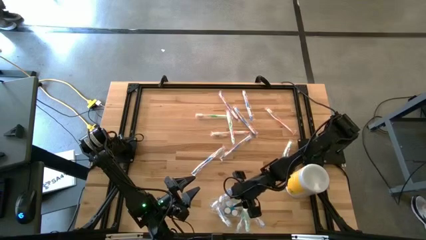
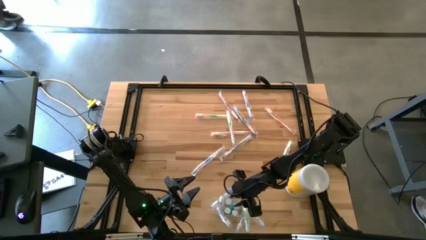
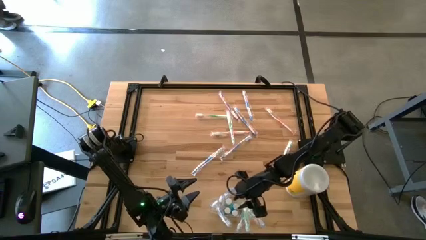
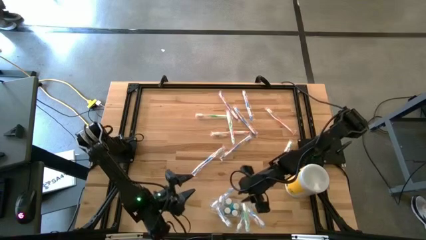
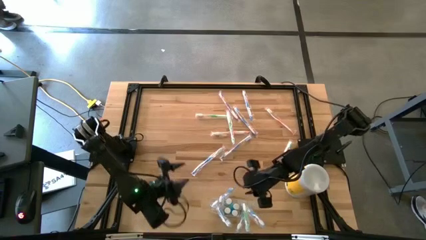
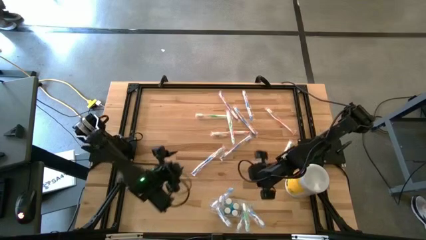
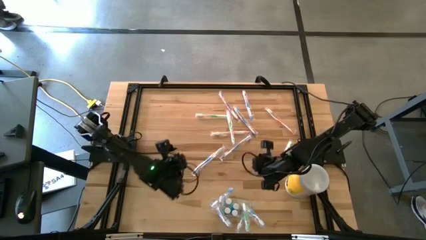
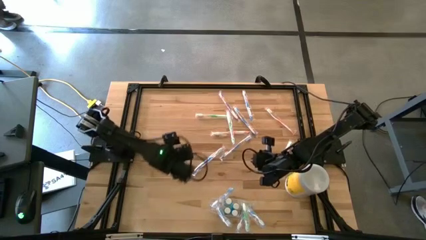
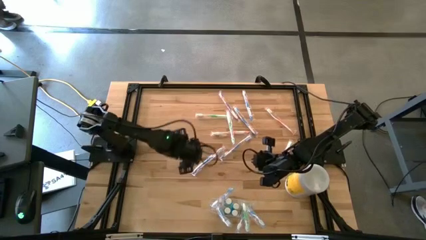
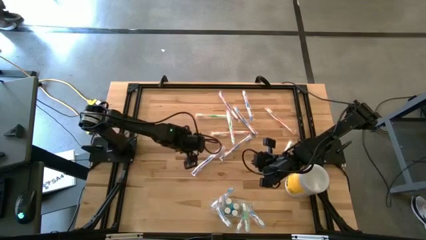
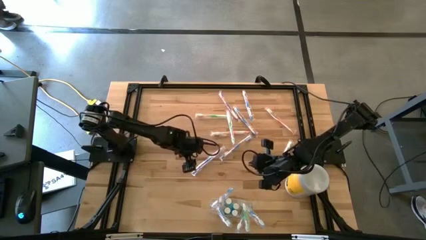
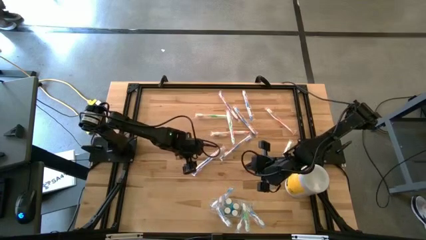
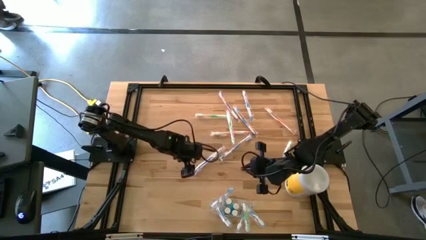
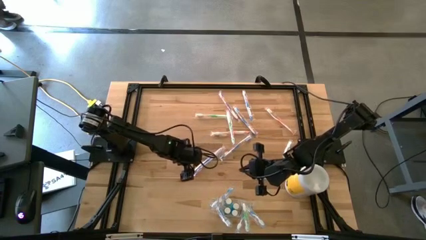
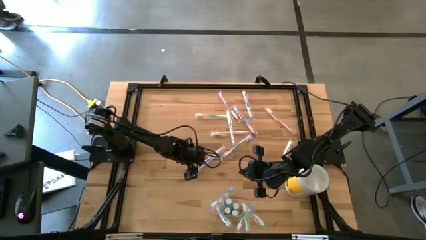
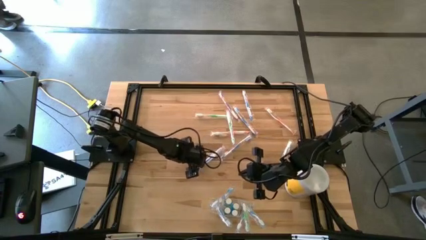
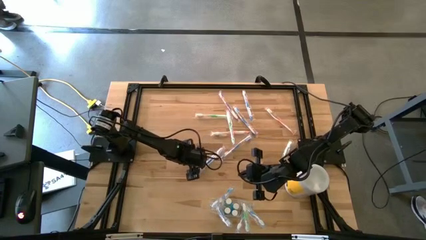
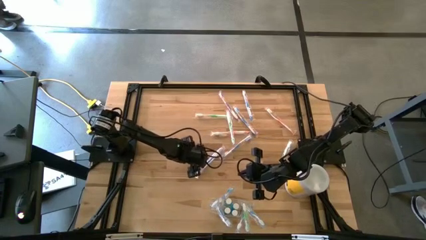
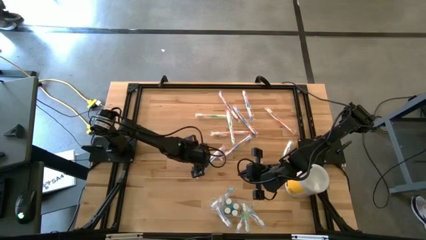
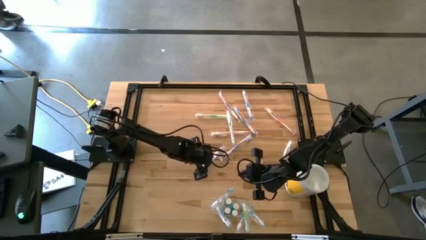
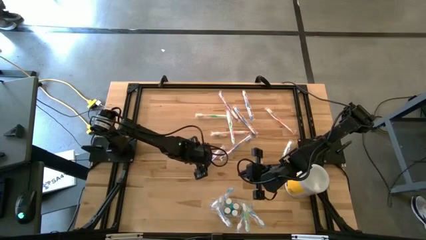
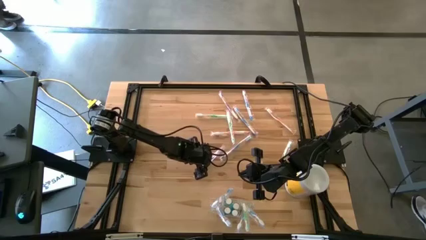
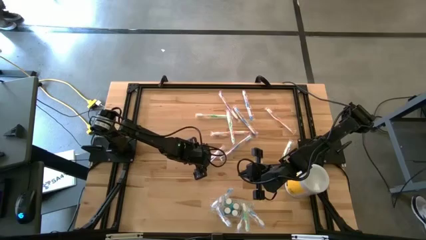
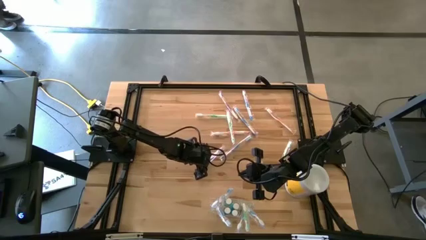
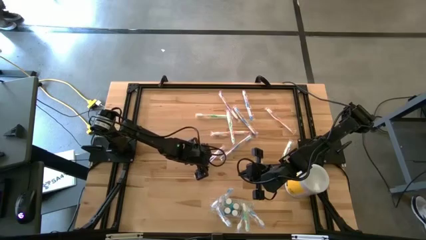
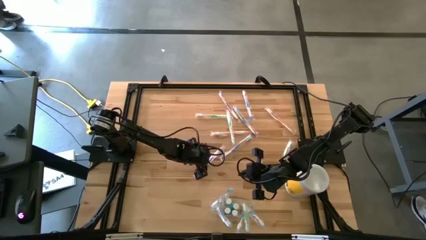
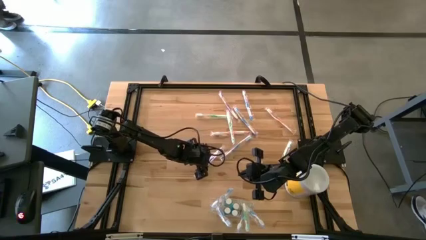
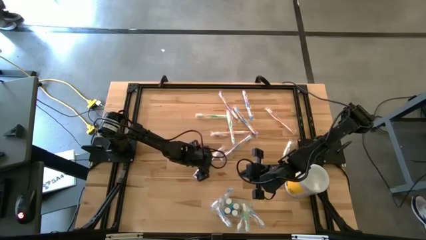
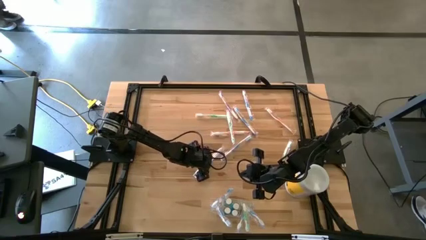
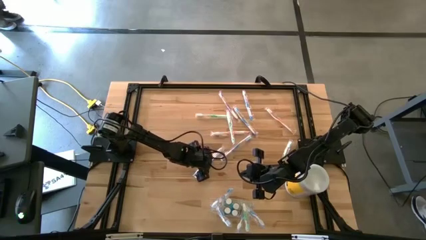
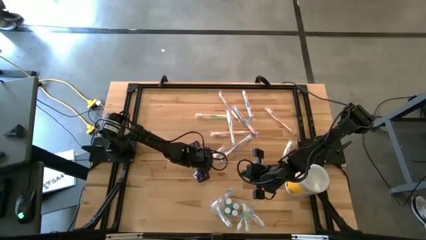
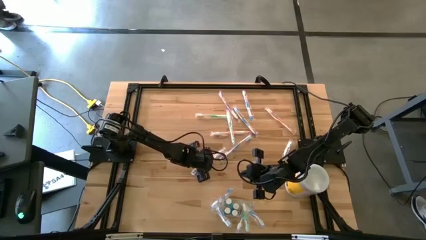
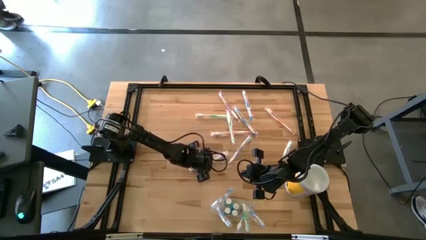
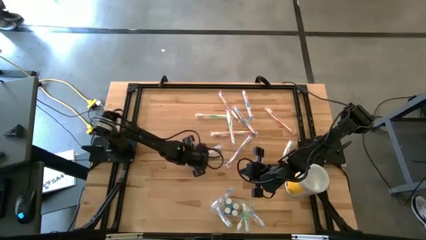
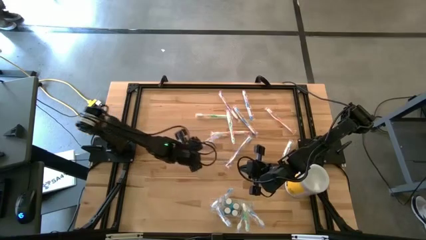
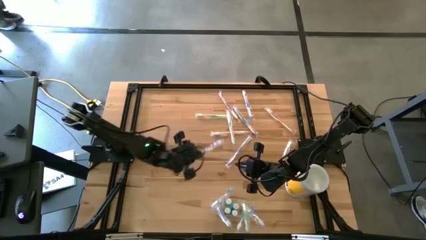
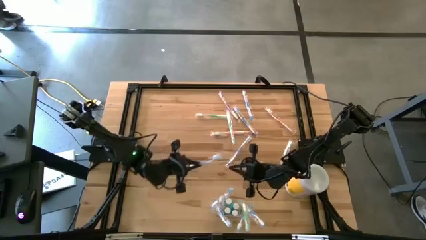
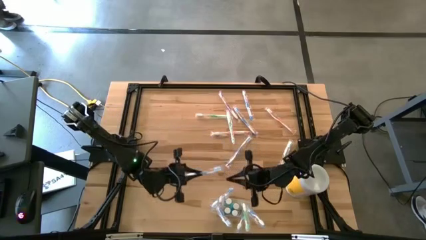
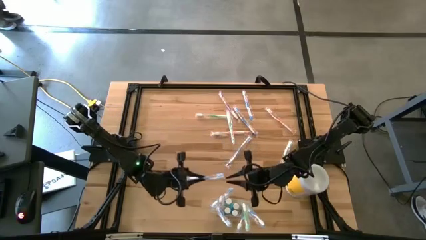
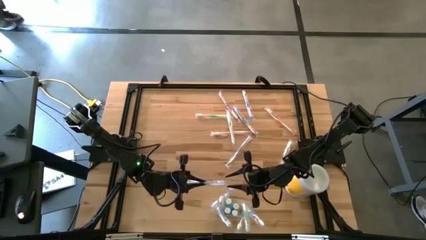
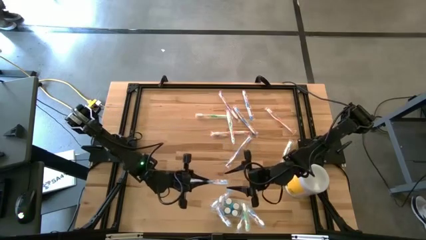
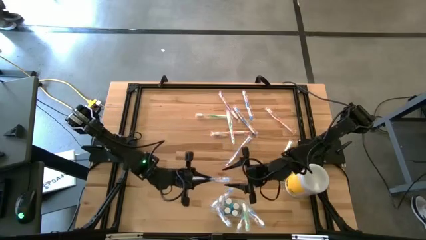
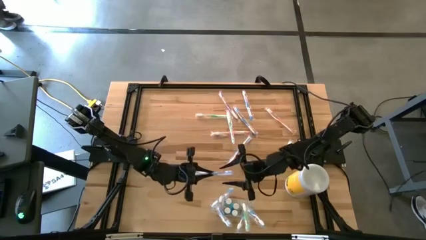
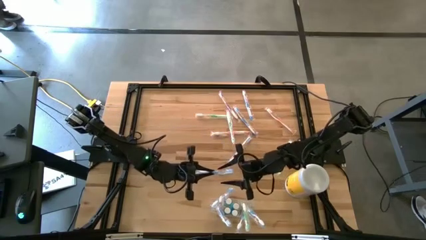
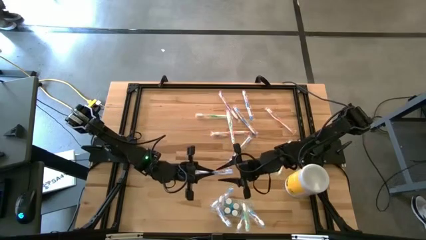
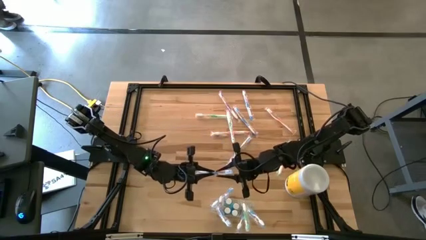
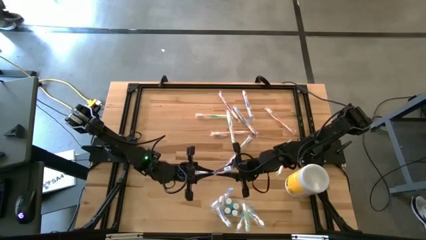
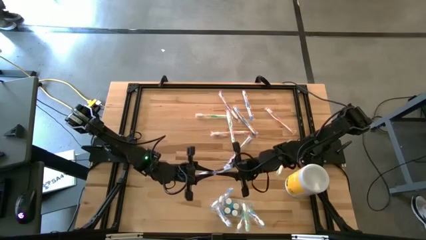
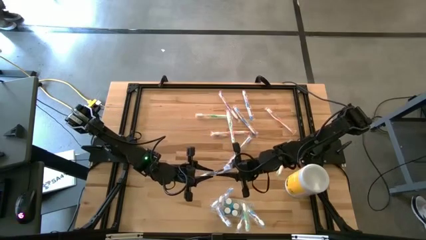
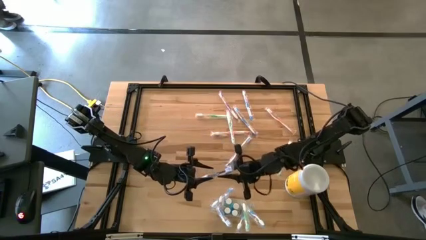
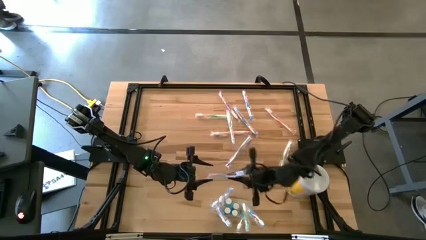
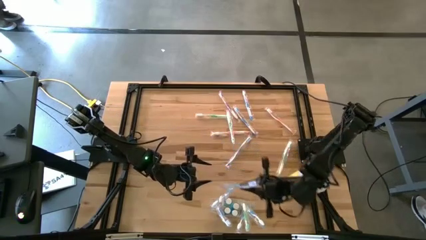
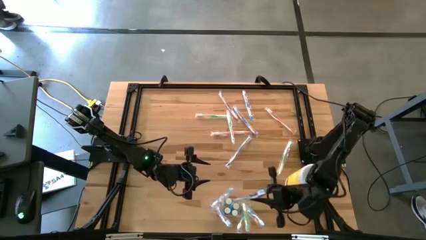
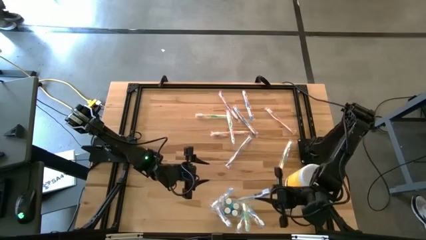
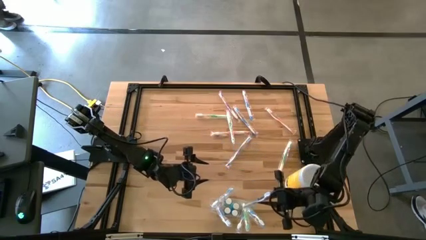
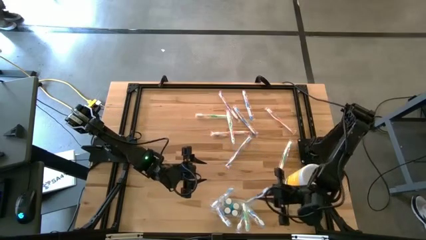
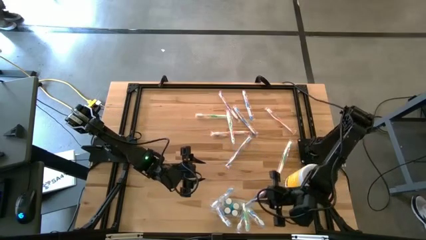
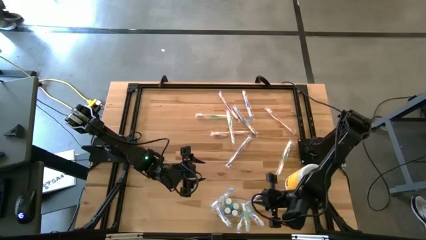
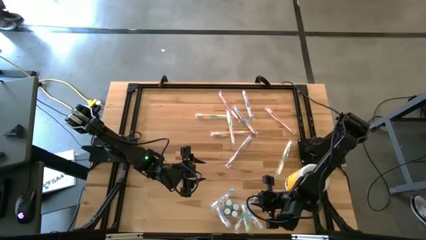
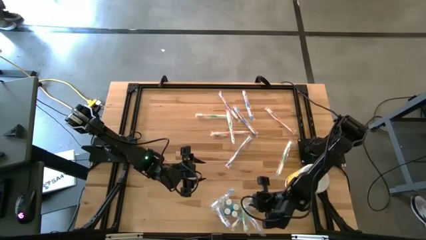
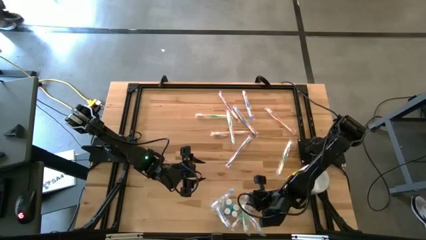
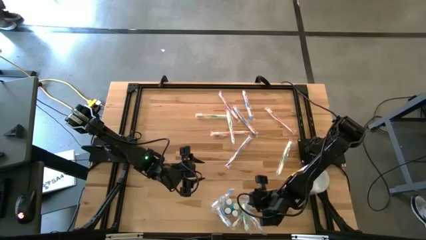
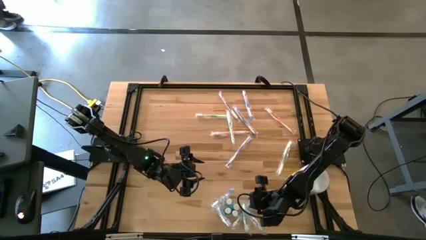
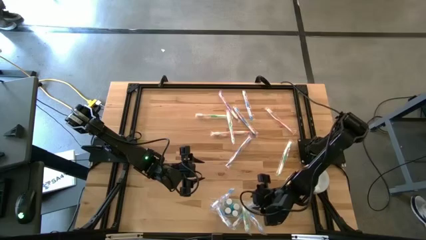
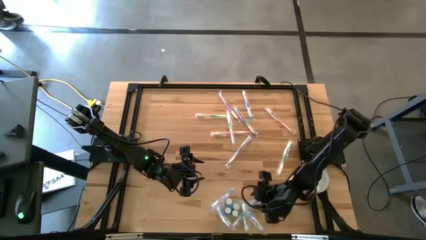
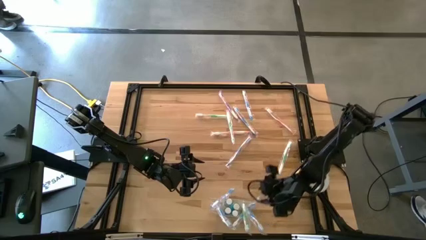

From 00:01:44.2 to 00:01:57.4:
Task: Pick & Place toothbrushing station
Put the blue toothbrush into the transparent organizer

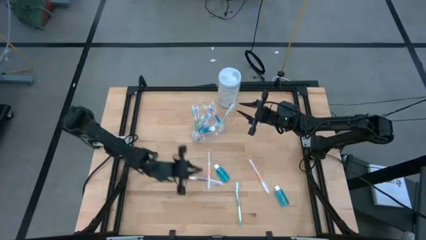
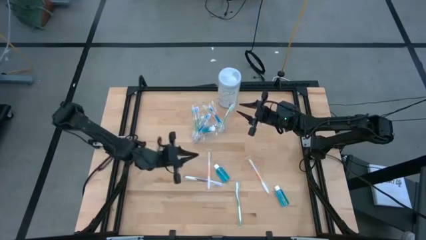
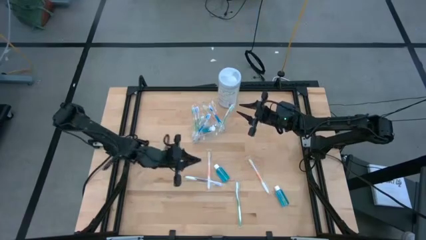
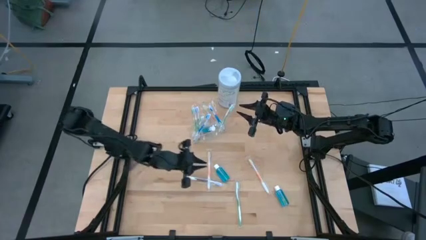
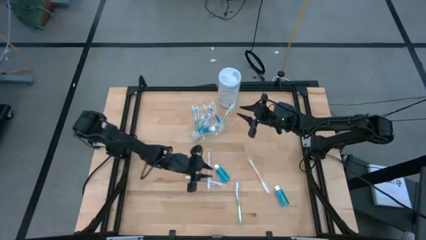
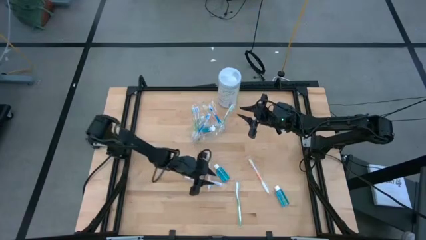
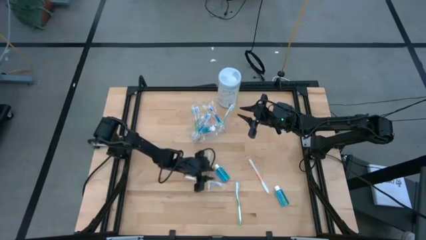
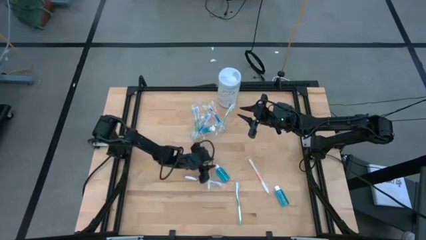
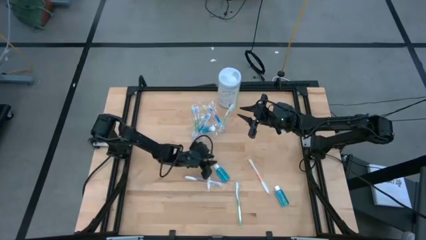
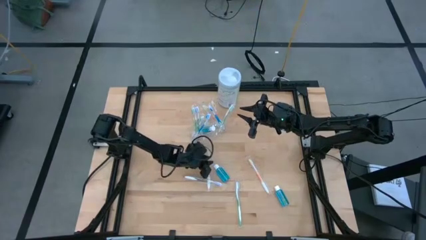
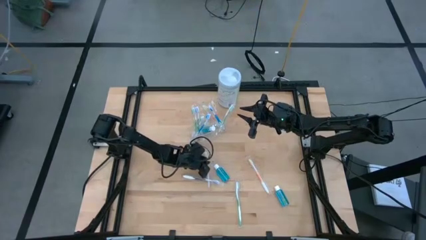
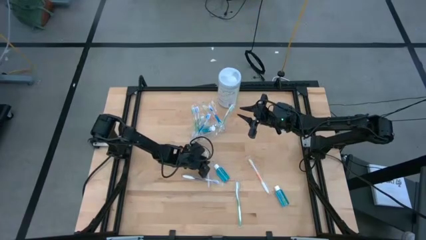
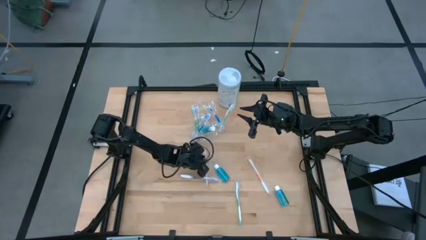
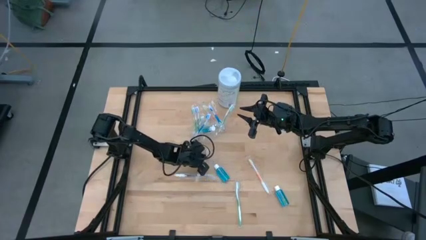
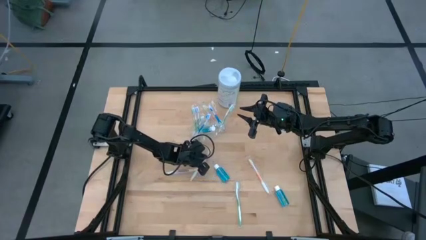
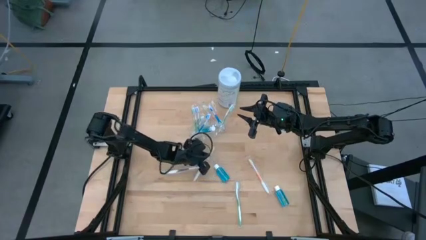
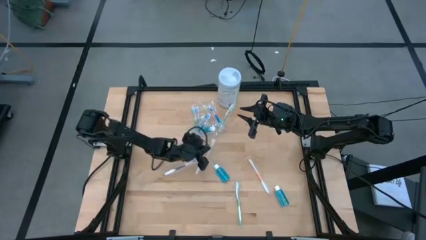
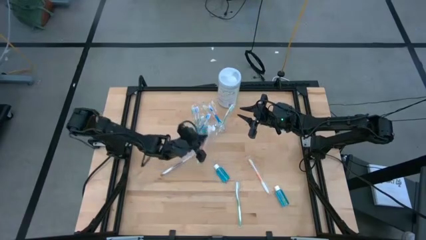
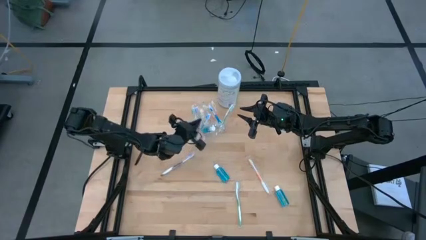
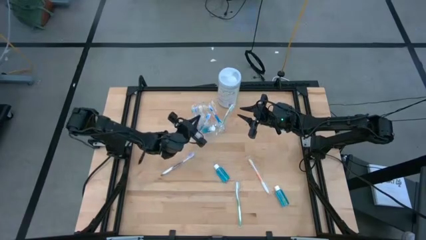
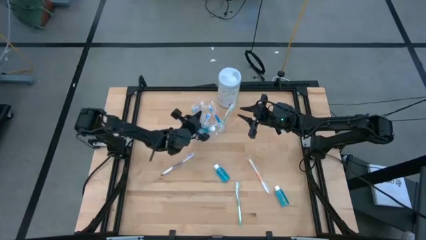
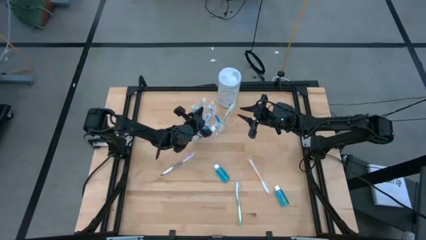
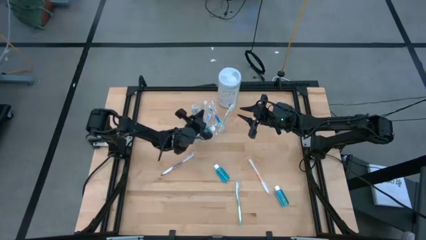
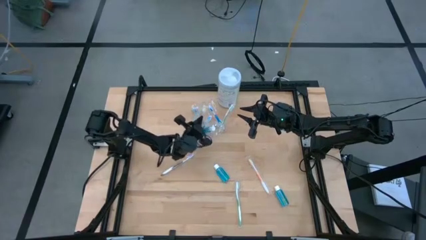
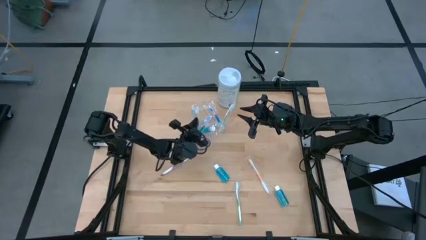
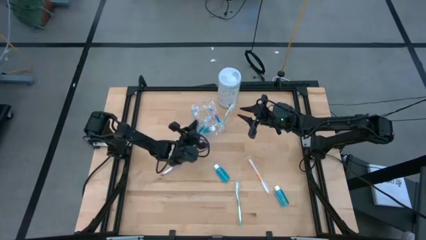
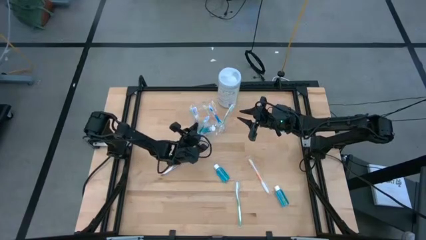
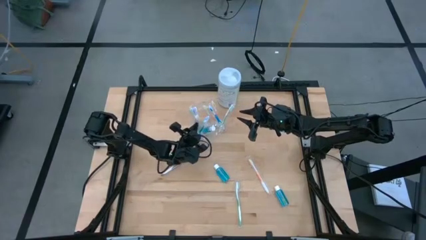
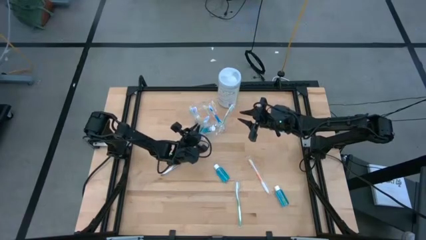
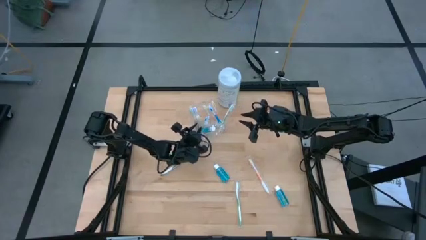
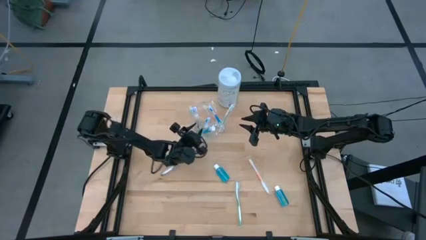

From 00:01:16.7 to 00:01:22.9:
Task: Pick & Place toothbrushing station
Put the orange toothbrush into the transparent organizer
